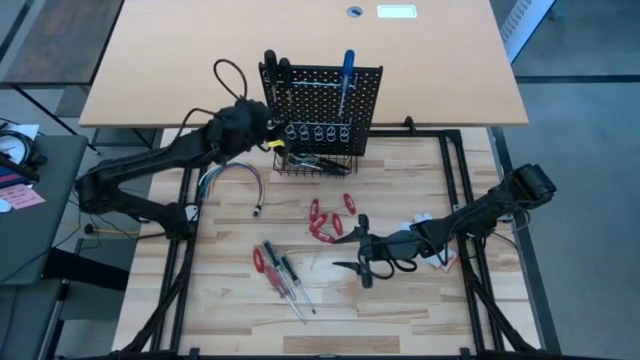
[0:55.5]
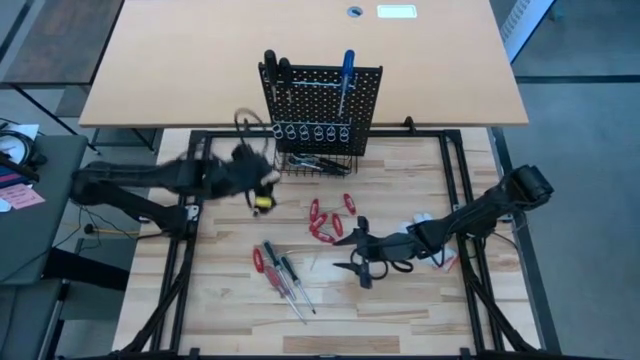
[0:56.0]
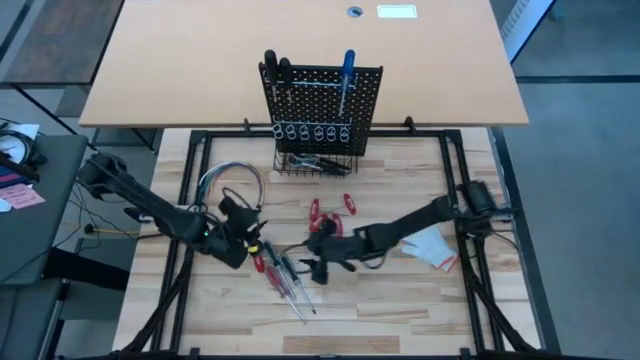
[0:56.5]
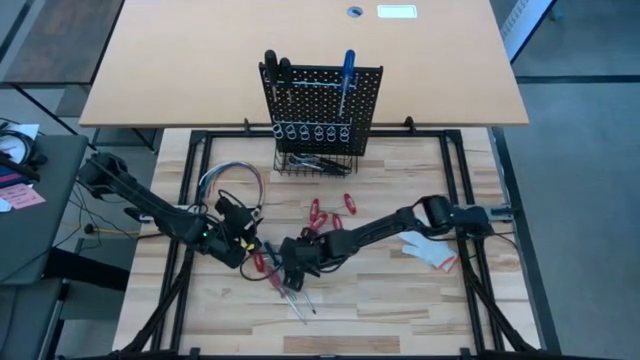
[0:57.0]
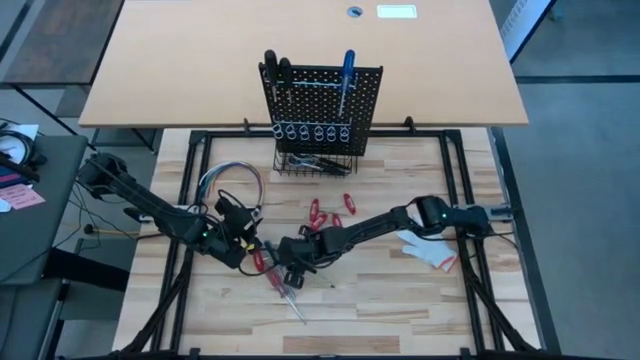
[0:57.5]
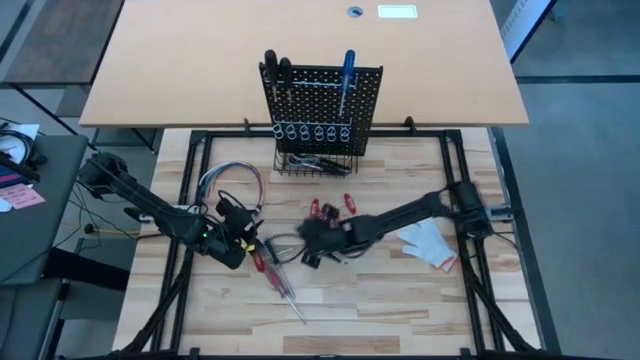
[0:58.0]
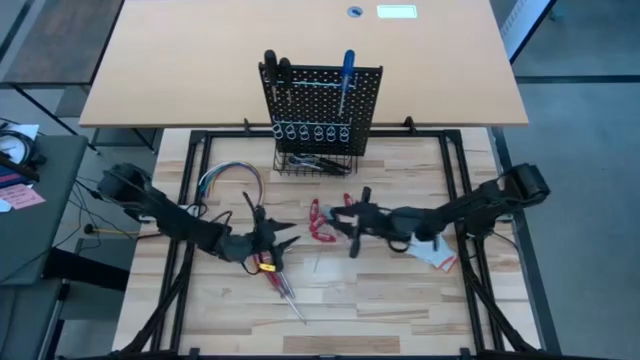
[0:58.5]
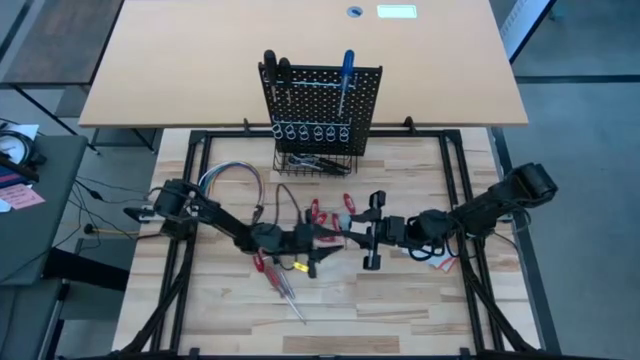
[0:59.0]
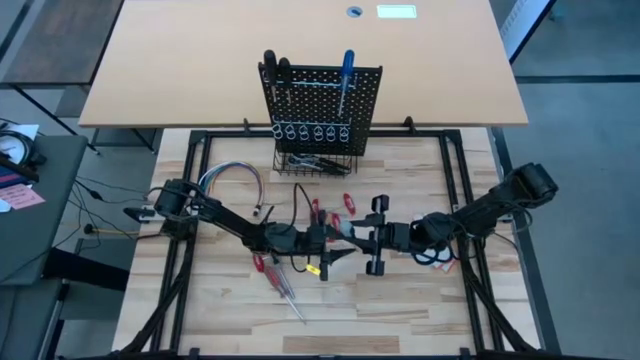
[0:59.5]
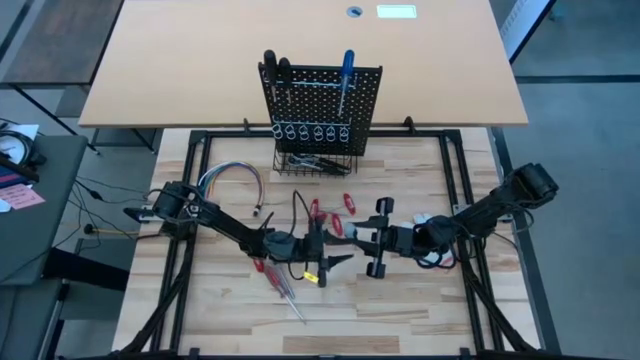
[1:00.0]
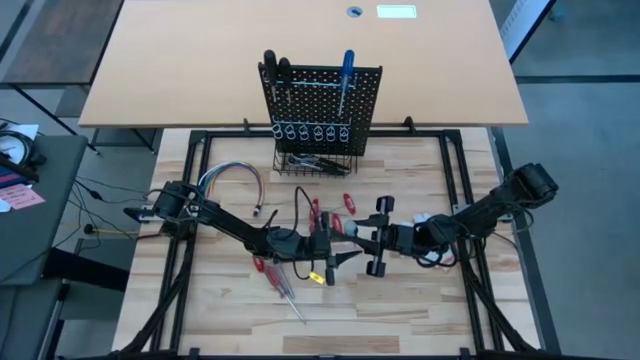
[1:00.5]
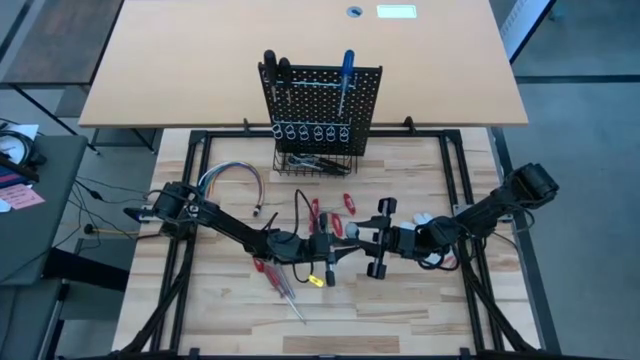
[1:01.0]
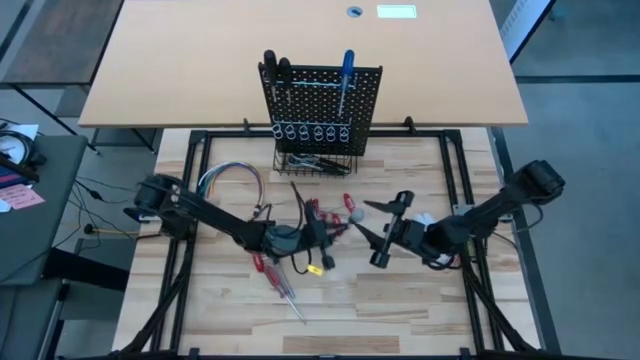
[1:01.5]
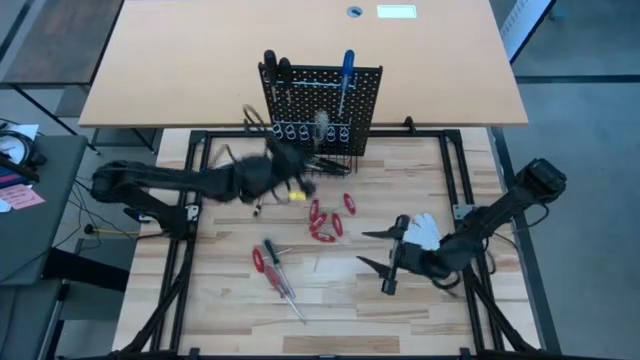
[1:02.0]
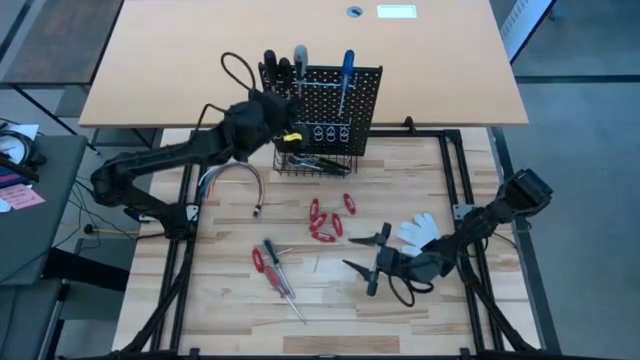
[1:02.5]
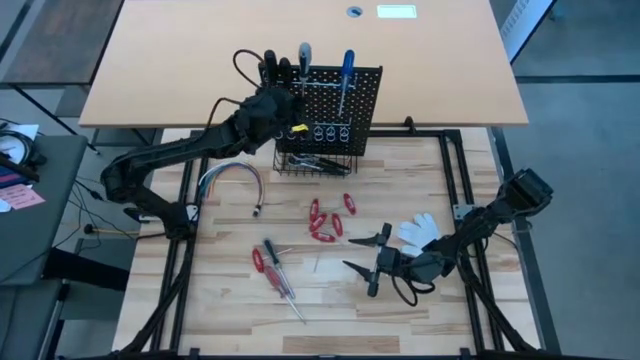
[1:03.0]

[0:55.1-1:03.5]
Task: Hang tools onto peg board
Hang the gray screwdriver on the pegboard

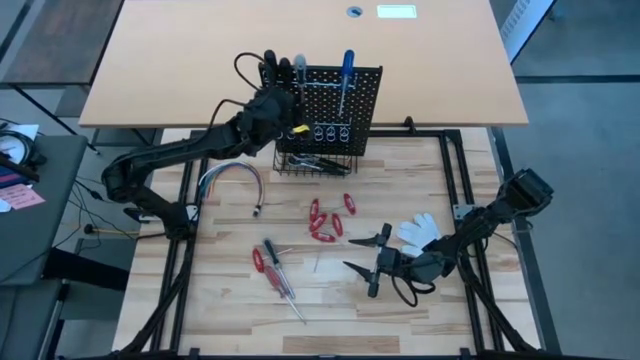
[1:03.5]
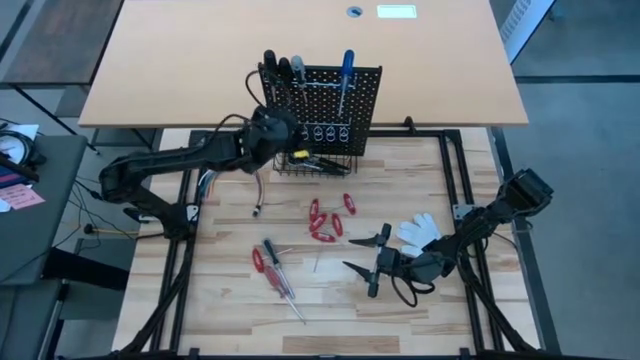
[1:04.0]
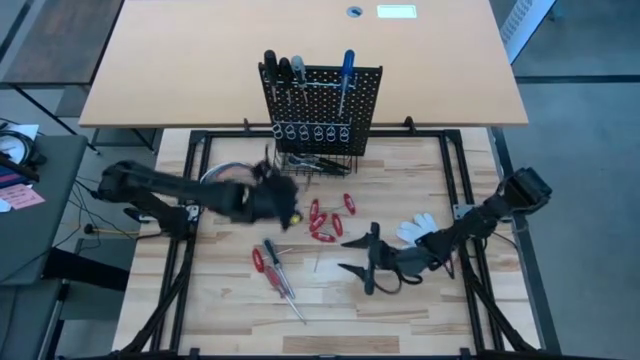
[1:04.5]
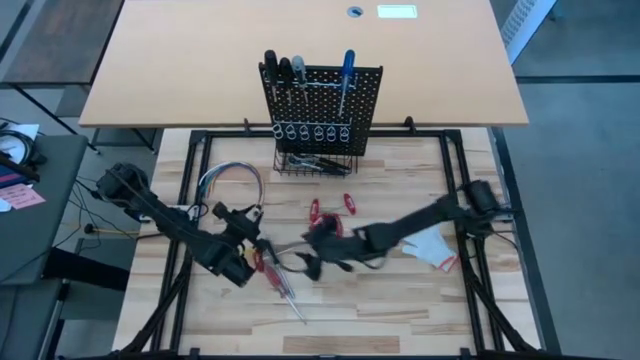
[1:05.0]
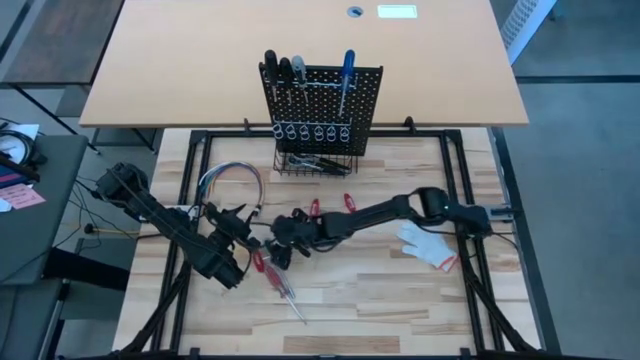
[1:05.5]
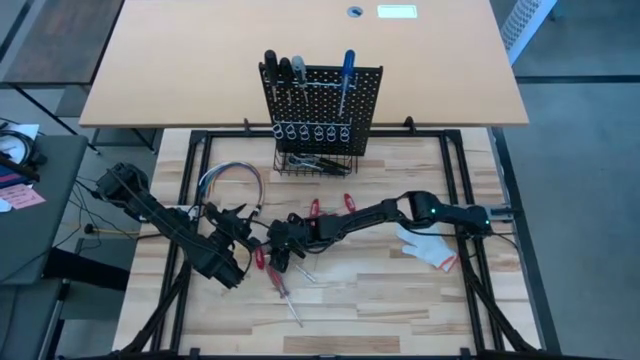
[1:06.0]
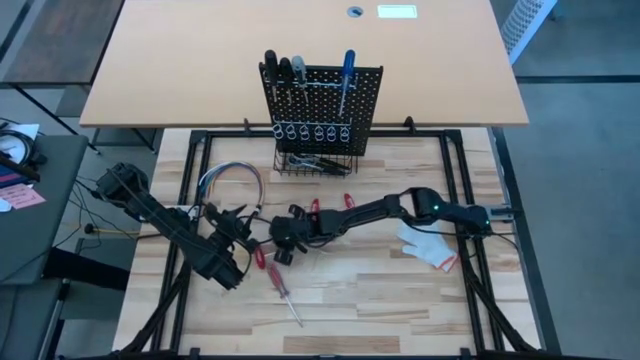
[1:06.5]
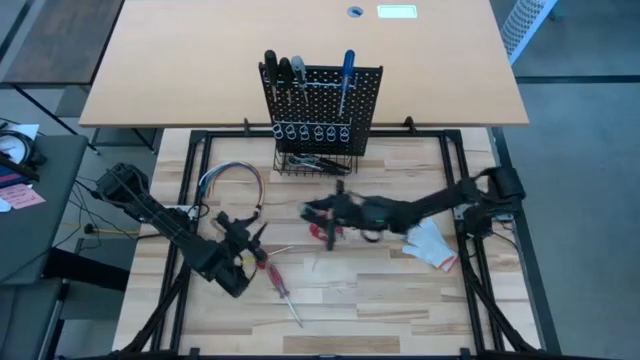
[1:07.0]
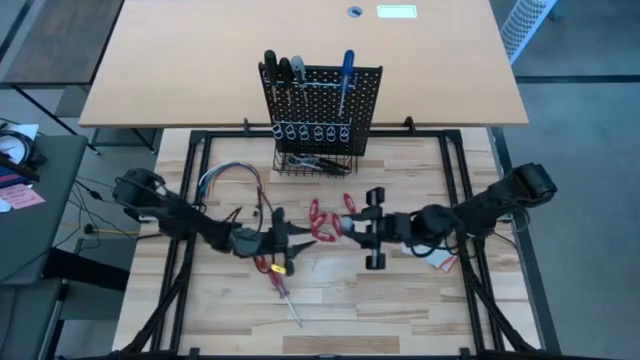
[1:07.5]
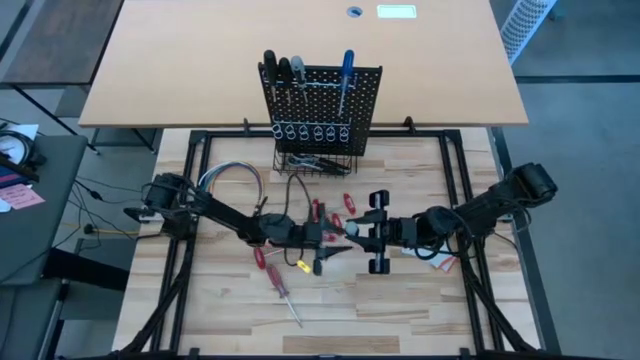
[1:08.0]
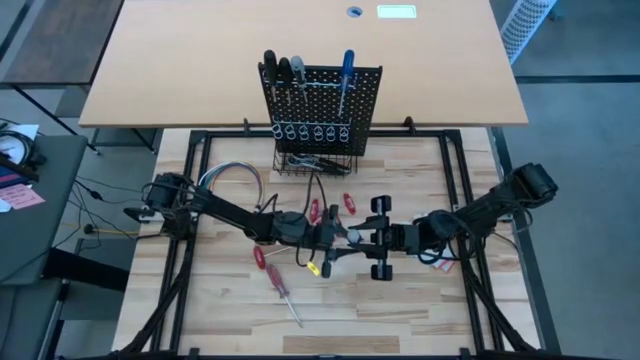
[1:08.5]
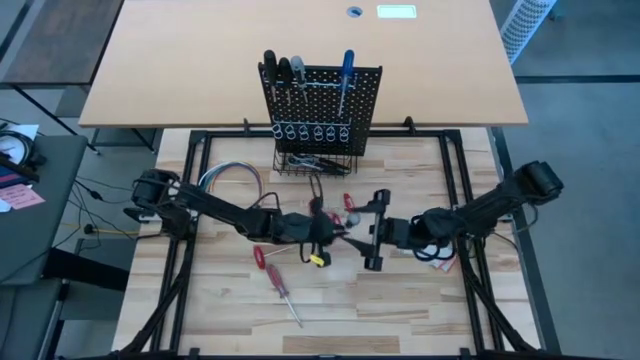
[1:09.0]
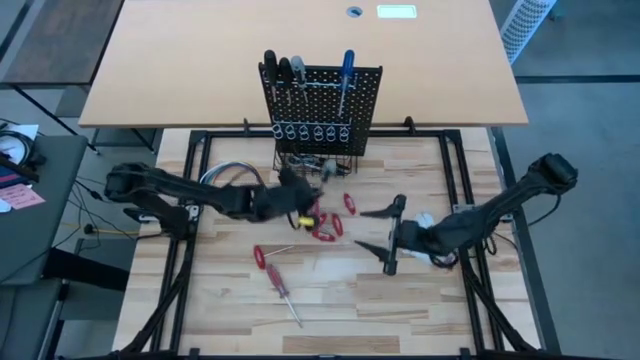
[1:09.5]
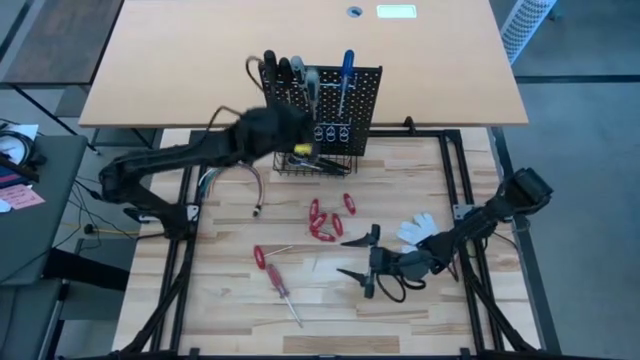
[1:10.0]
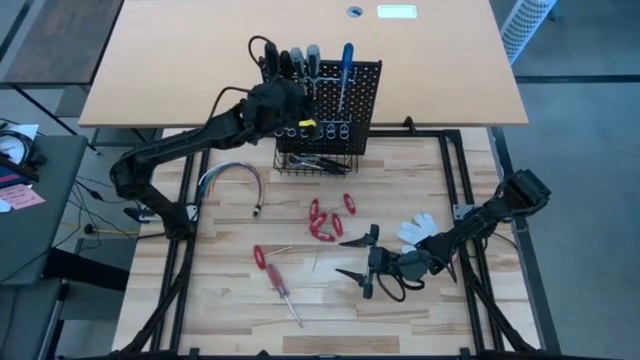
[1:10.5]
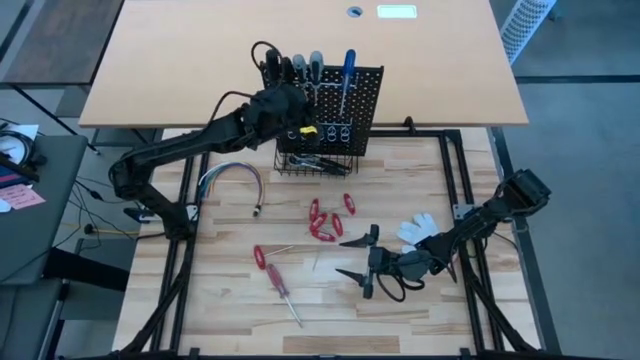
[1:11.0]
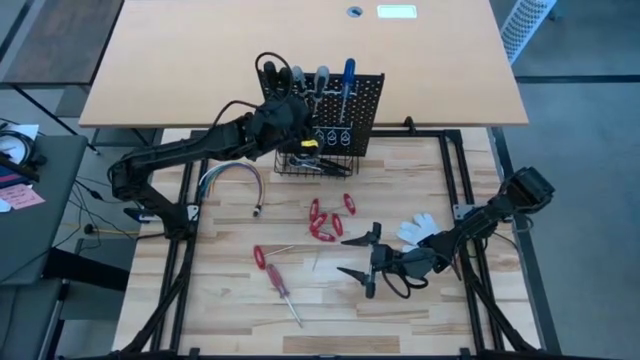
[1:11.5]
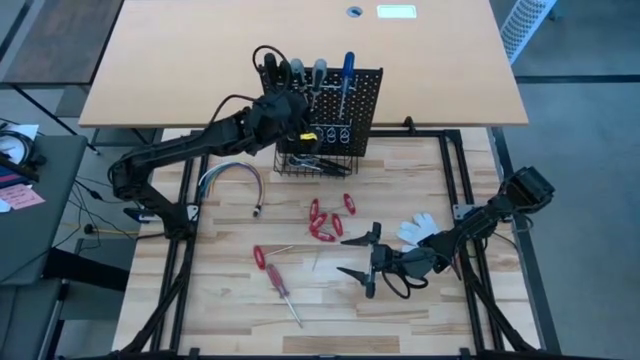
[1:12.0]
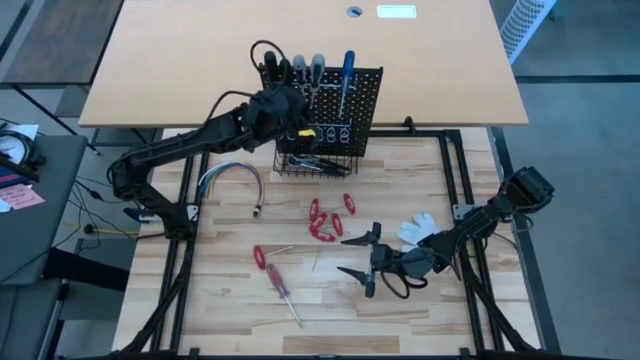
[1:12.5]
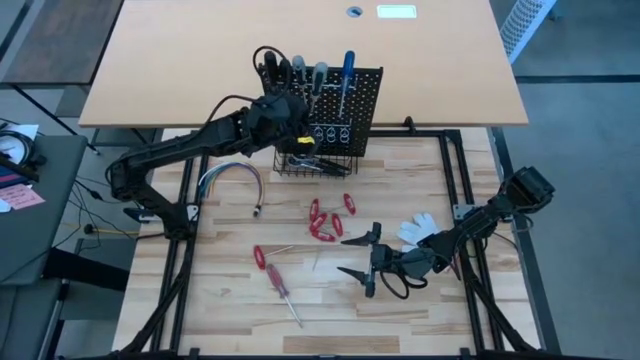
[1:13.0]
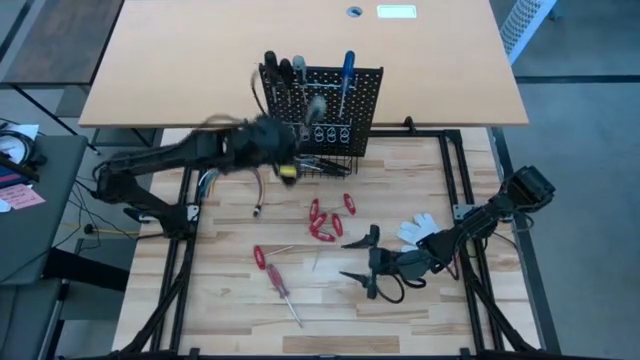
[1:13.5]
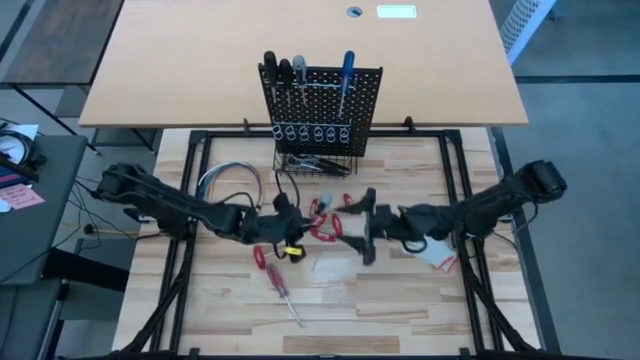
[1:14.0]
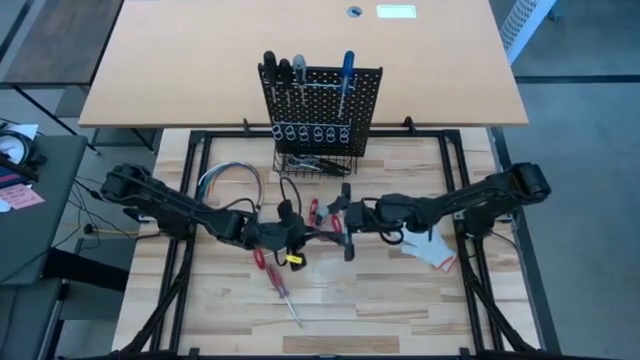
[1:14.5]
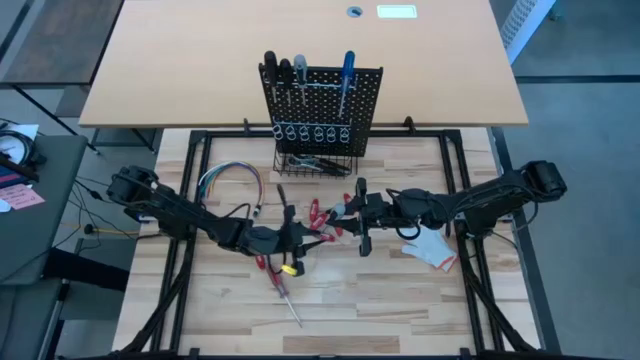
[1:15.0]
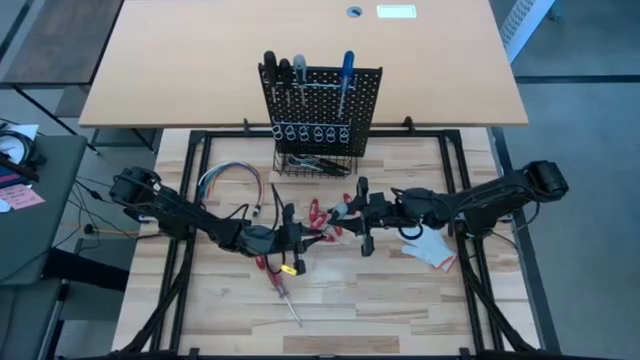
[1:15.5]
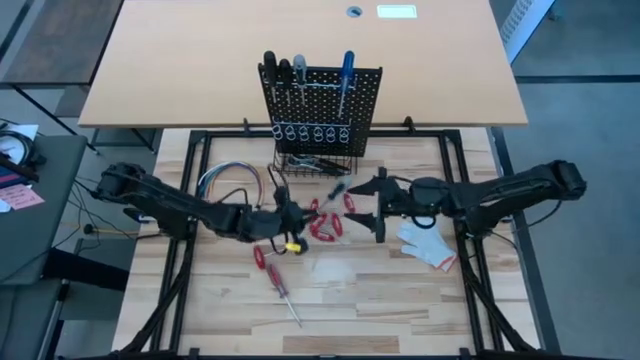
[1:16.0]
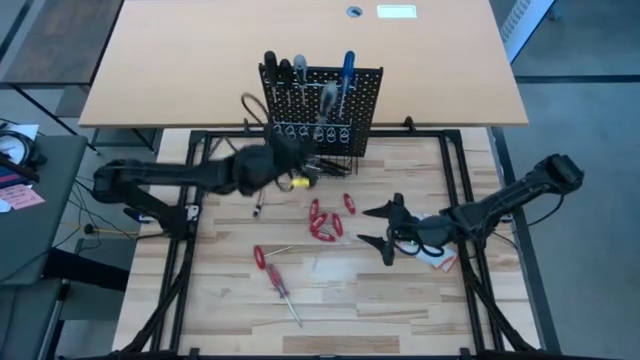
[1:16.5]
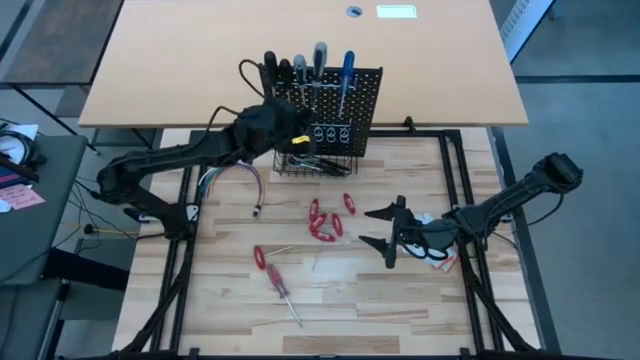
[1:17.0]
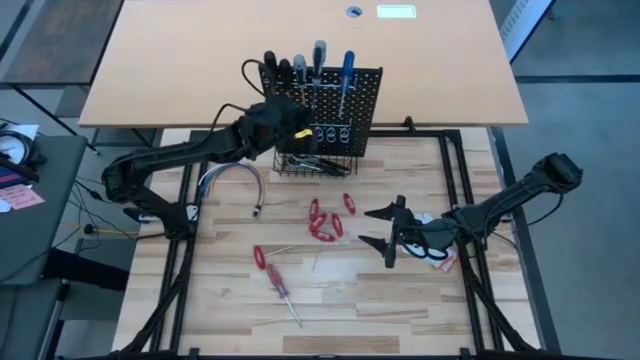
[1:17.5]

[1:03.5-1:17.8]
Hang the gray nut driver on the pegboard
